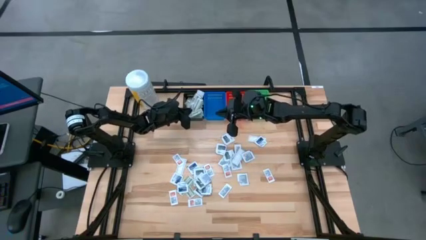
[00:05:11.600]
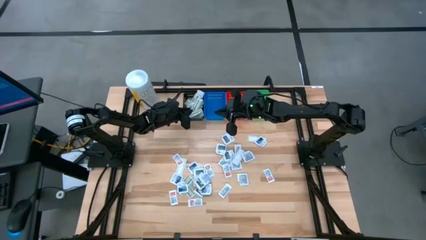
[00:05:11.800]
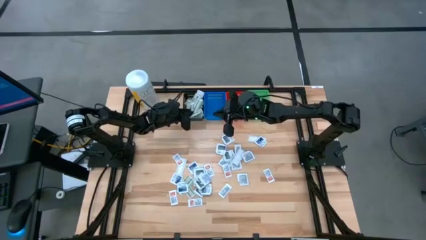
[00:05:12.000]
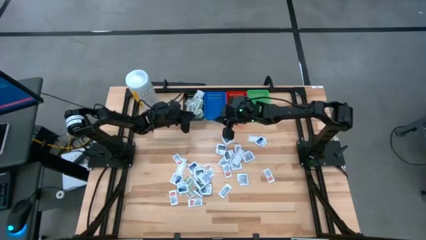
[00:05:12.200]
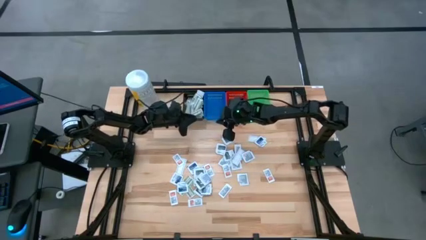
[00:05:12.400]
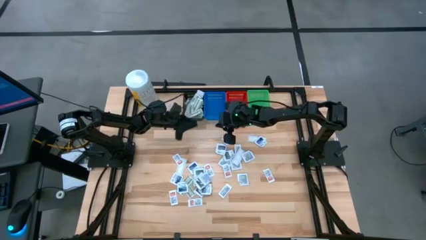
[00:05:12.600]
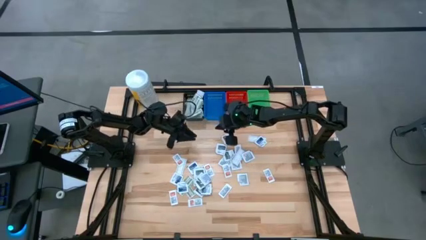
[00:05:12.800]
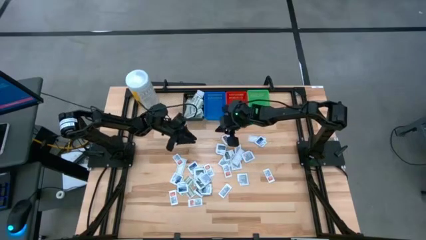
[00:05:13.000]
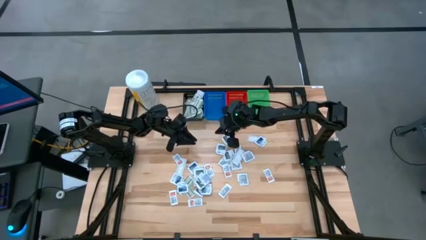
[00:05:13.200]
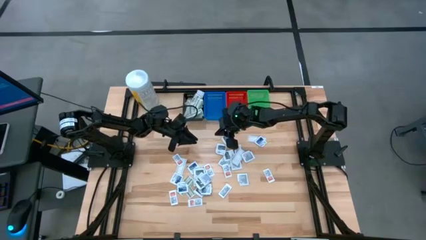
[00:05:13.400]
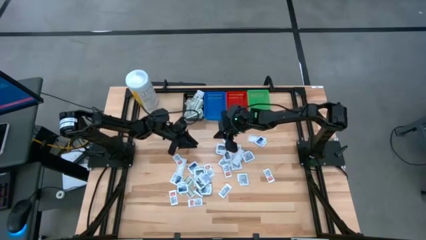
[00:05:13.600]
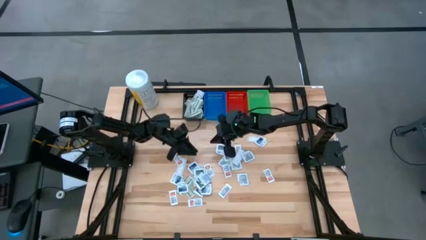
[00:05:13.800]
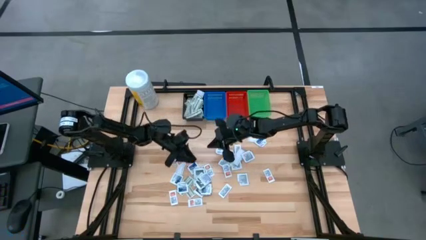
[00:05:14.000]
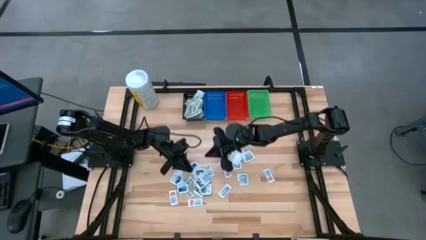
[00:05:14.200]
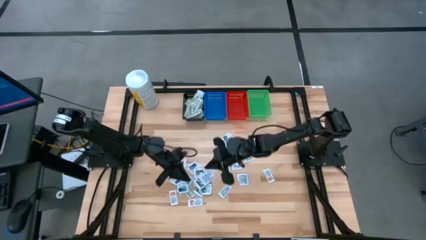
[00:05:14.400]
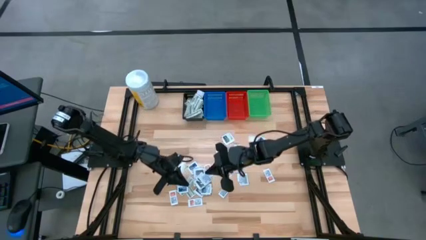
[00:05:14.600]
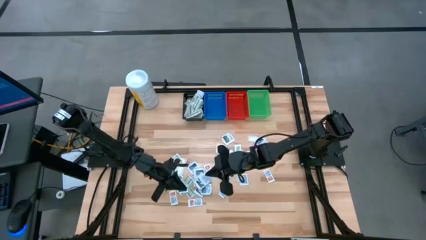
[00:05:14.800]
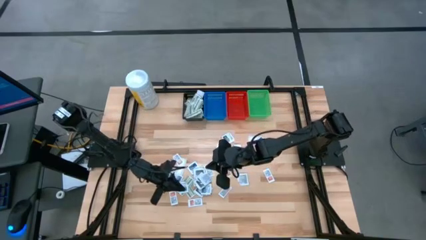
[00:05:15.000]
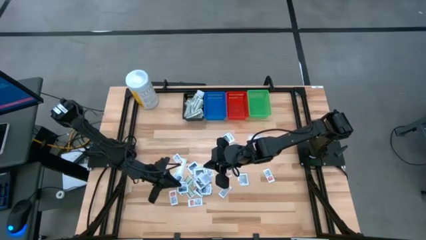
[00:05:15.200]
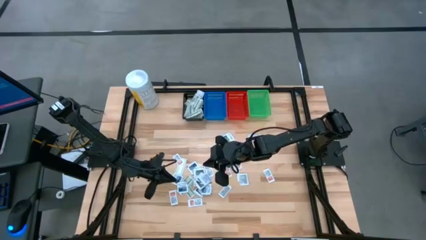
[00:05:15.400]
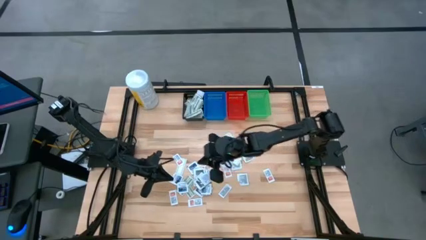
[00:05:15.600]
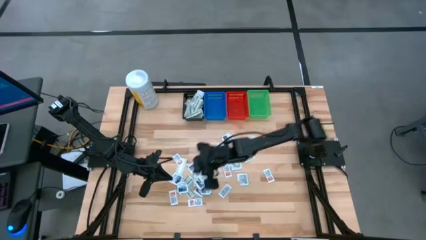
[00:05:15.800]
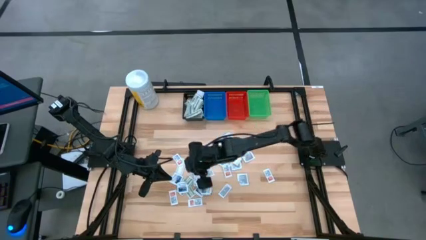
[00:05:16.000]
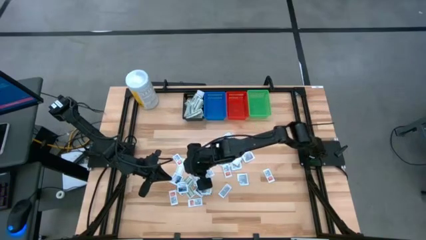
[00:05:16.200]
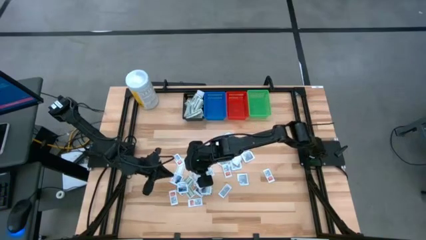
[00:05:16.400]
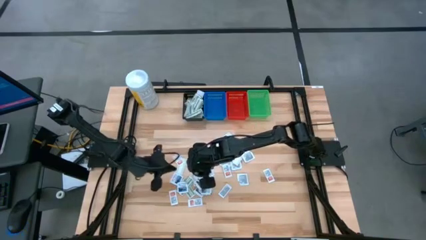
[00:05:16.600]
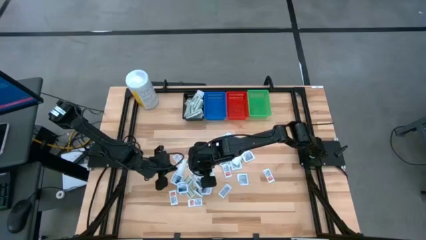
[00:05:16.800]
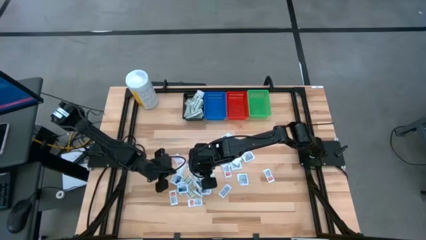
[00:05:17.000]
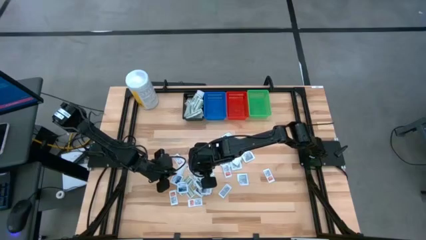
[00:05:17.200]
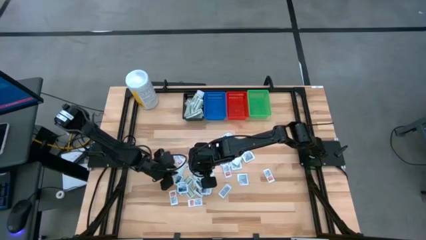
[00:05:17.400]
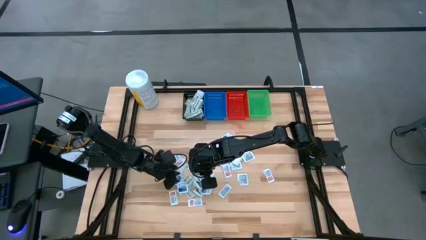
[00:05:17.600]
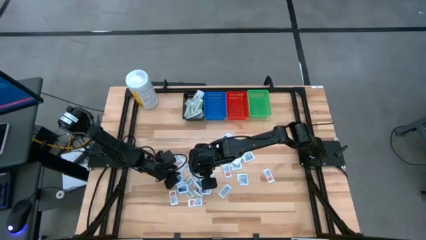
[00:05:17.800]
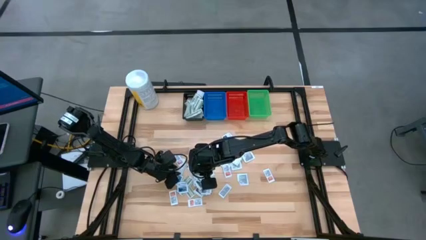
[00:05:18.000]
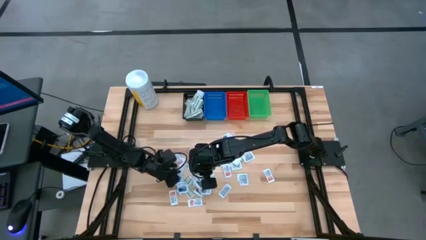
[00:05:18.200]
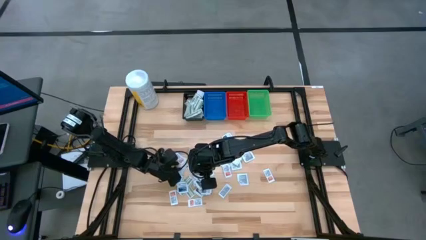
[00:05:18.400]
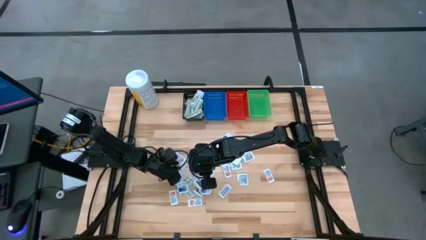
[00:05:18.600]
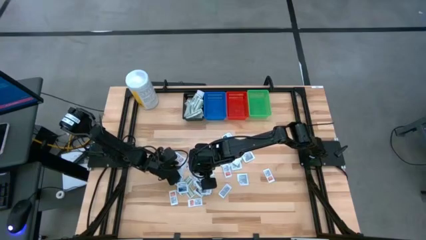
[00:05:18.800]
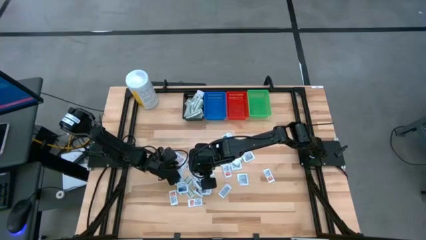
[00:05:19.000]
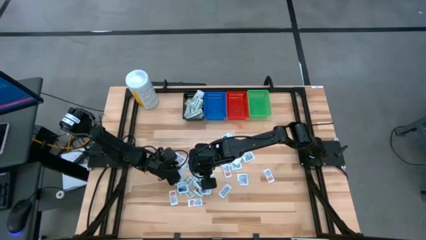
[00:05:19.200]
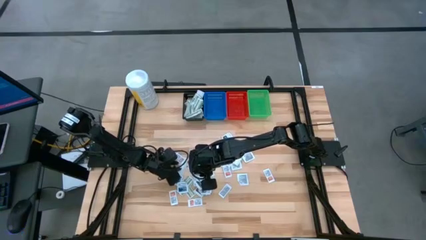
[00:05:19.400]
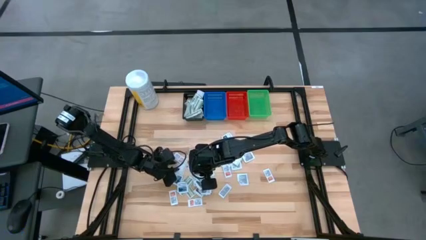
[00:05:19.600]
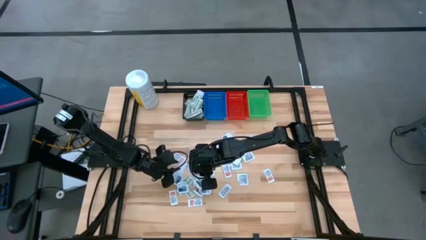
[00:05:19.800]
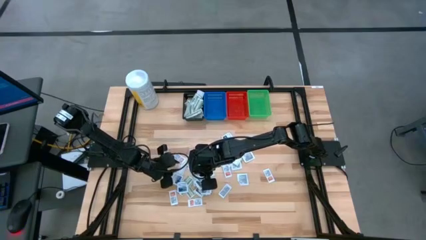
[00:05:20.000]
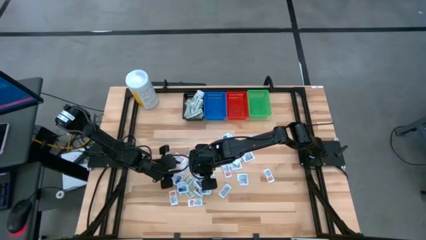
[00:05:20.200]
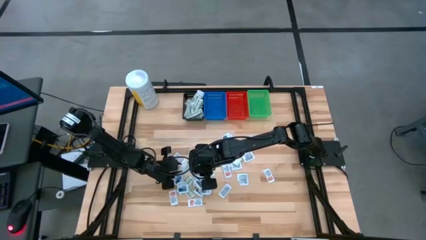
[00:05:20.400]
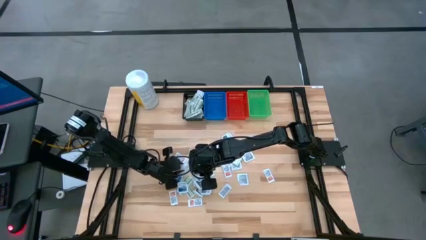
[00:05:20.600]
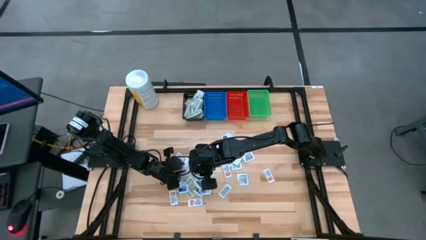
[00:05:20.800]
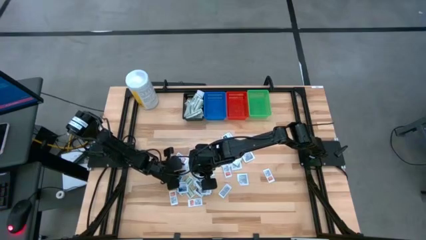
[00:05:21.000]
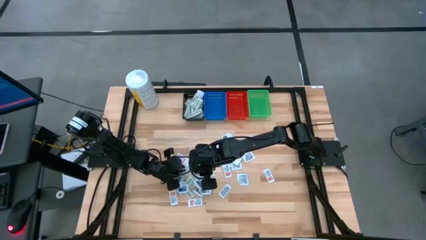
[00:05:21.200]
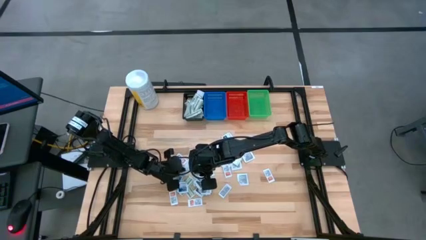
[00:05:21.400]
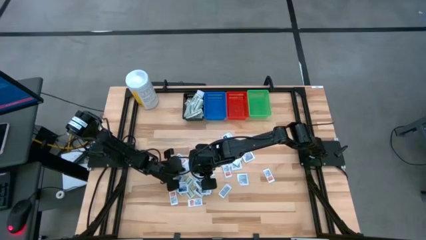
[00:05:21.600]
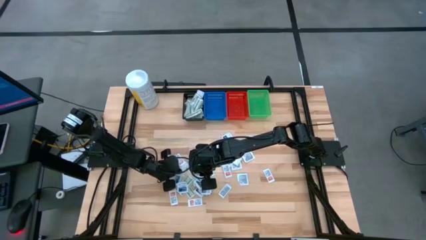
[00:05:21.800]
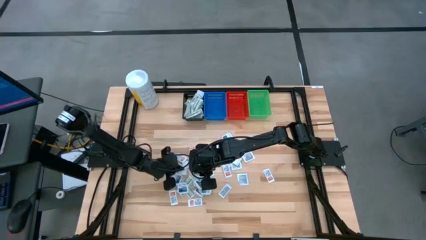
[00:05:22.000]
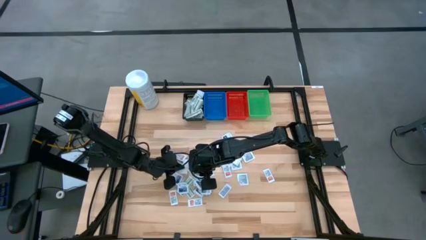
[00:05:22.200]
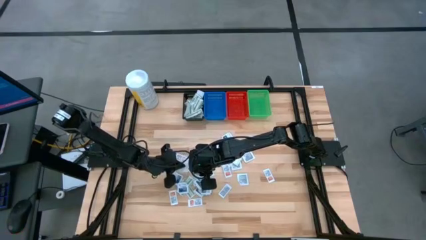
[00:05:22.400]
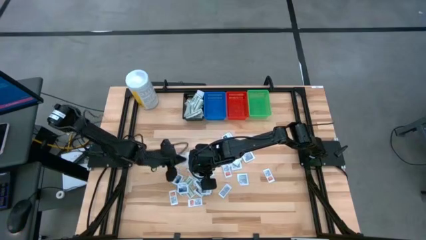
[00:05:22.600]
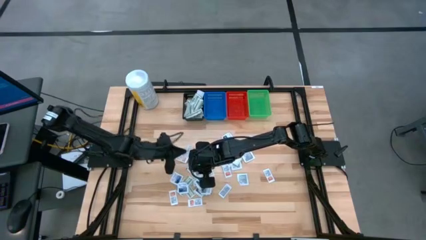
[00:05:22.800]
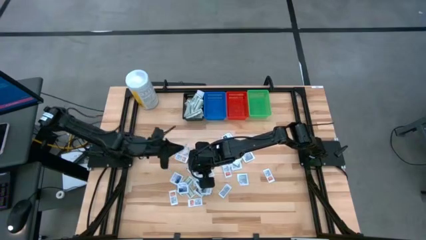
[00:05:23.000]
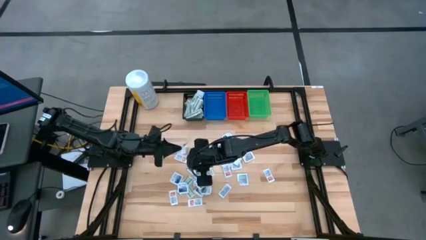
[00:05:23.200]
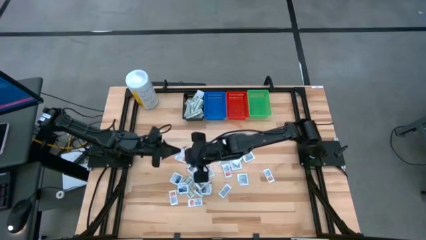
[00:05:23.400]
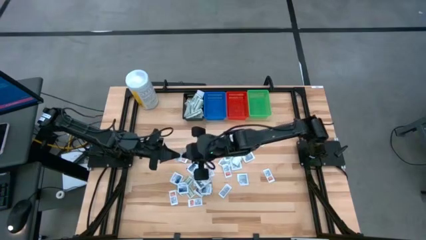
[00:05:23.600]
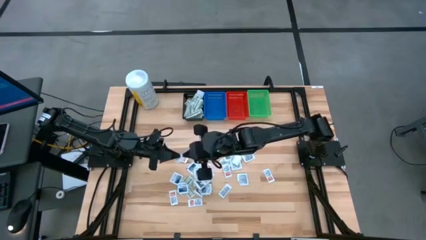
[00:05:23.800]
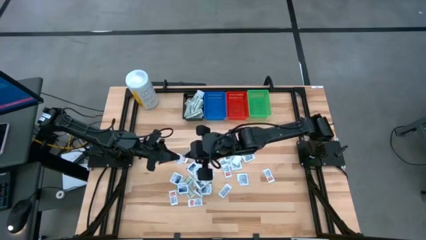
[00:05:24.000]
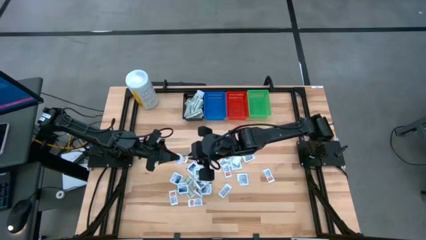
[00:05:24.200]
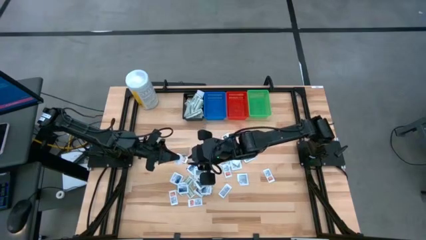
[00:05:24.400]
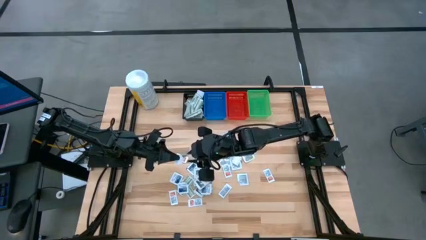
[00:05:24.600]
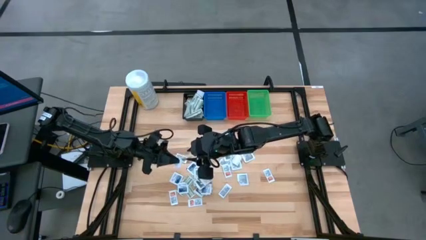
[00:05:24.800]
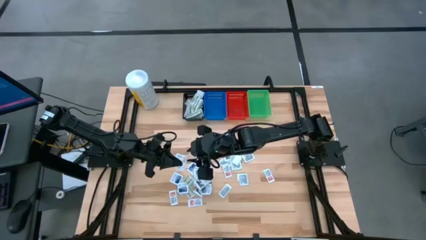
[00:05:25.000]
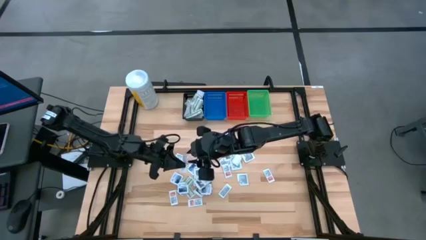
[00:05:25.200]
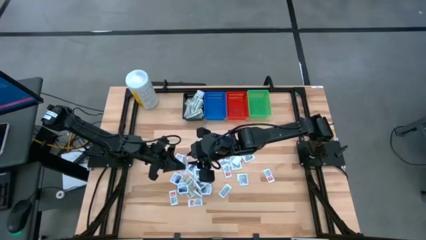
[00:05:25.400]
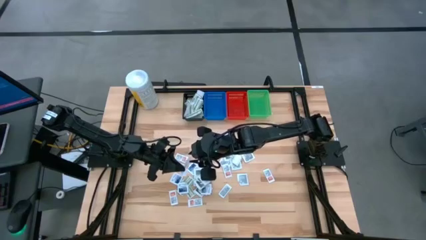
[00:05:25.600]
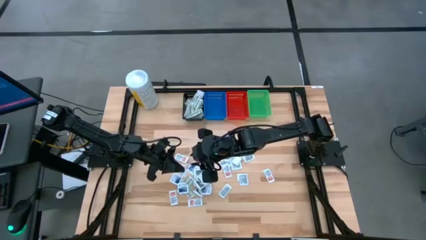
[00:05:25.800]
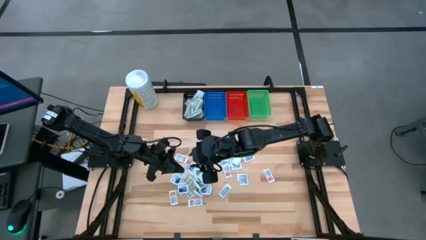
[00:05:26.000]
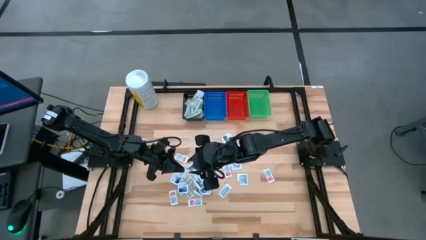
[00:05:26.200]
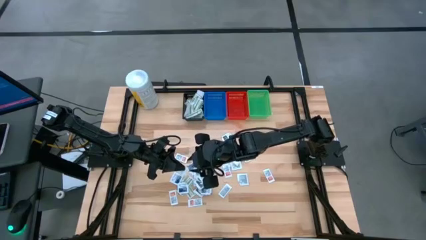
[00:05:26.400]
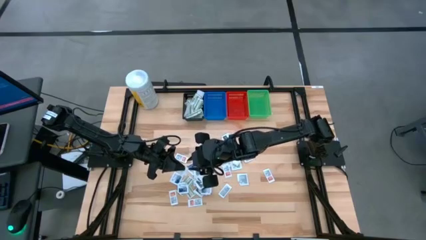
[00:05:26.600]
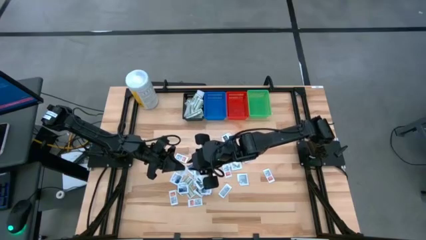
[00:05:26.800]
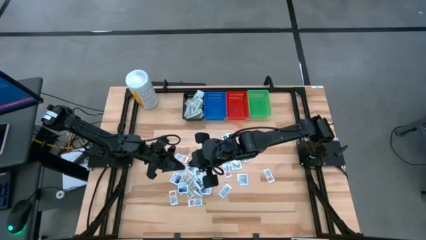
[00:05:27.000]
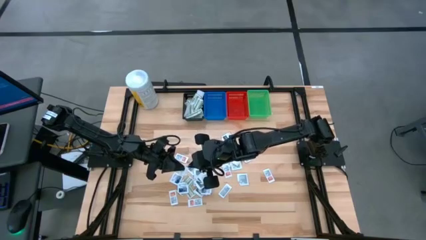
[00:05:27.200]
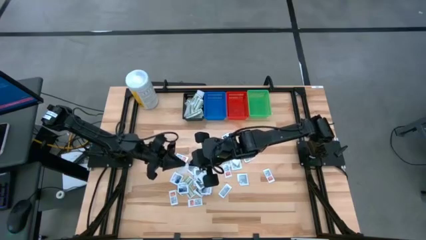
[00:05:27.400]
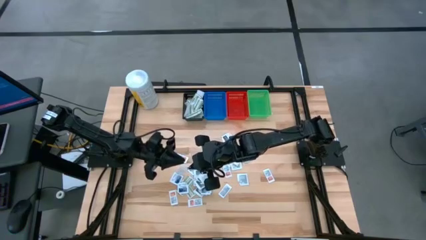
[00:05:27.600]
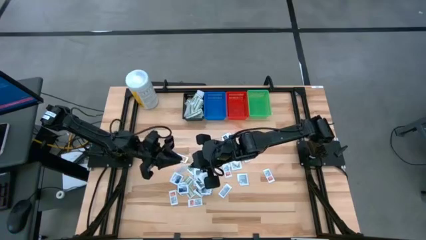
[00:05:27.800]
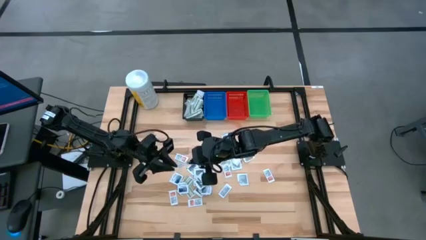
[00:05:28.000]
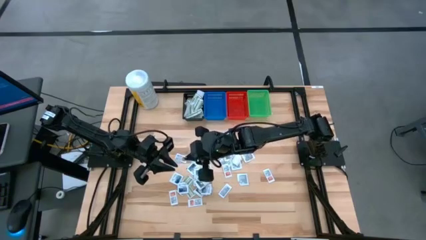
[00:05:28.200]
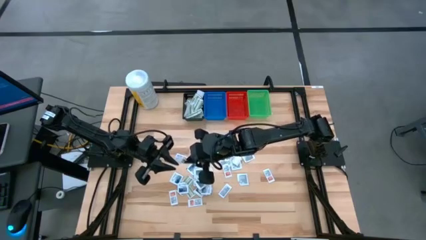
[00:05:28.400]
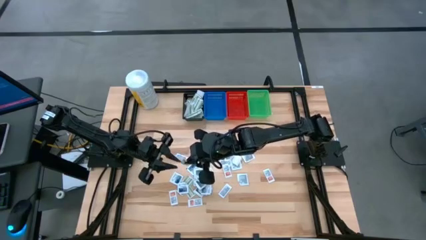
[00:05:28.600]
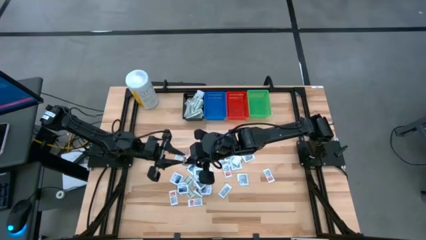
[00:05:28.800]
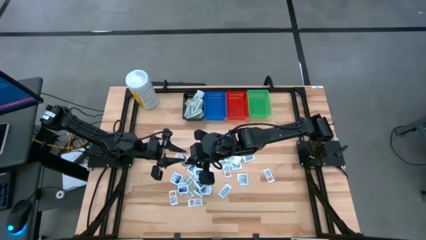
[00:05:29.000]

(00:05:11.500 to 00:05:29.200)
Task: Pick & Place First Aid Supplies
Put the green bandage pack in the black bin
